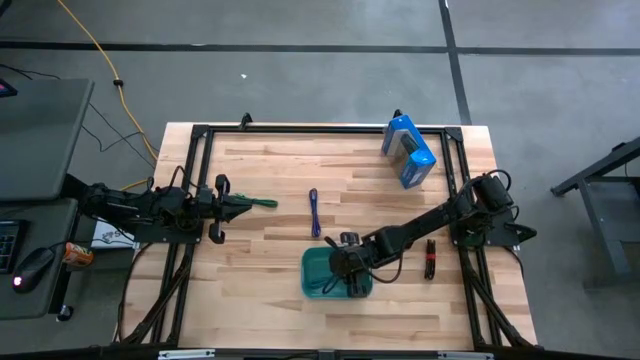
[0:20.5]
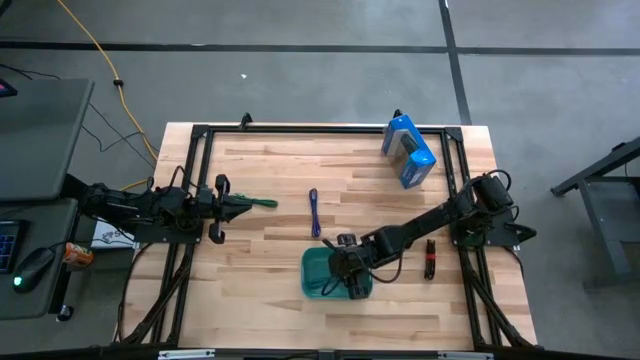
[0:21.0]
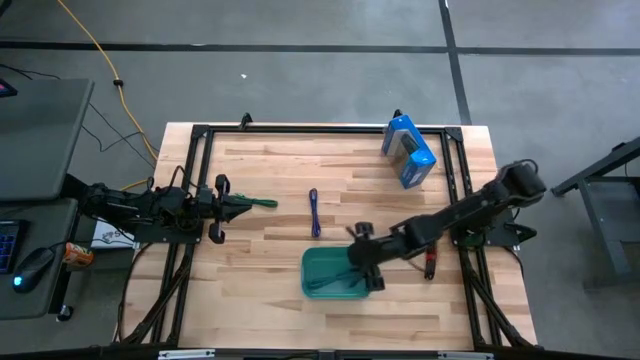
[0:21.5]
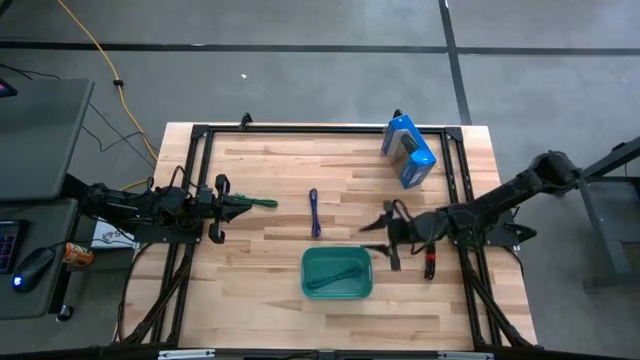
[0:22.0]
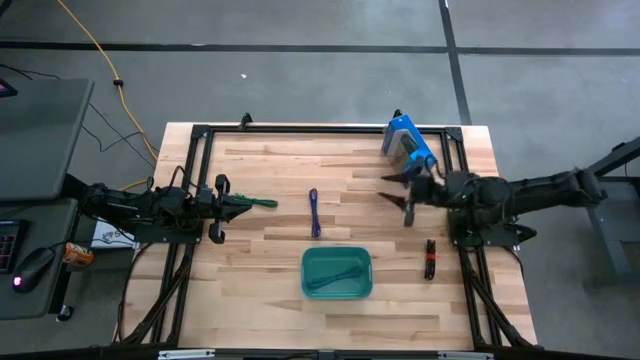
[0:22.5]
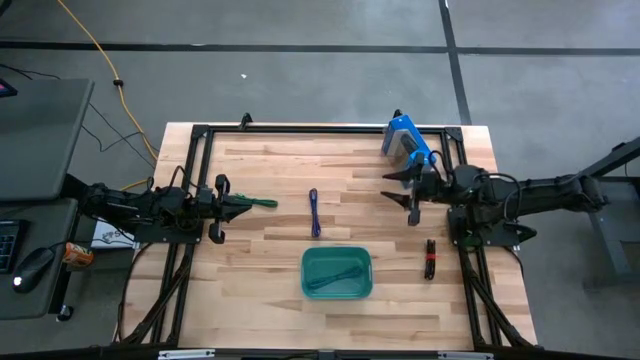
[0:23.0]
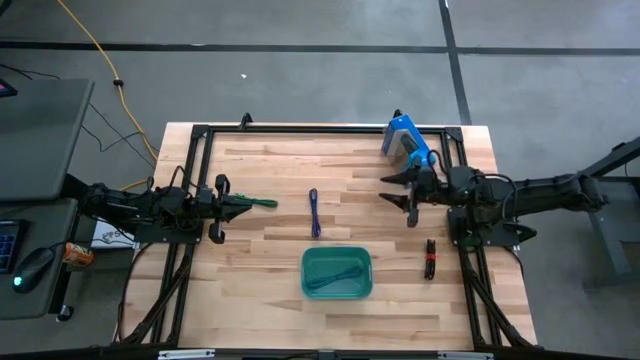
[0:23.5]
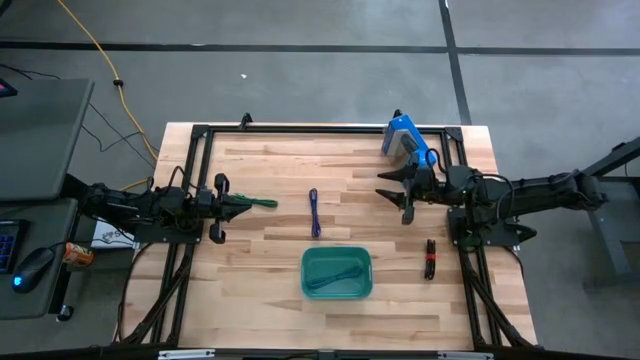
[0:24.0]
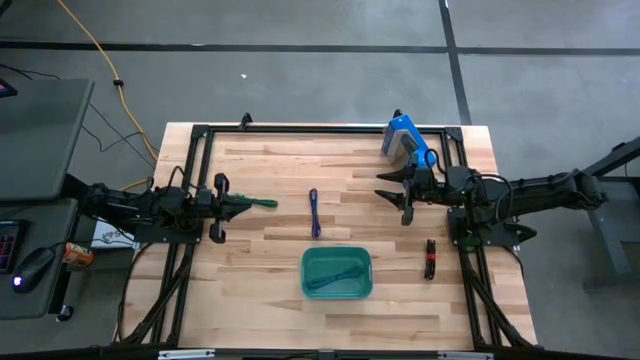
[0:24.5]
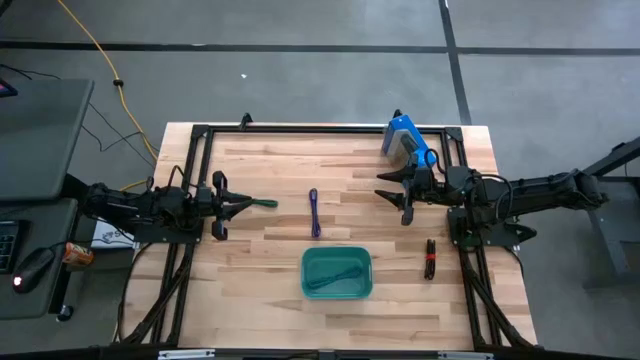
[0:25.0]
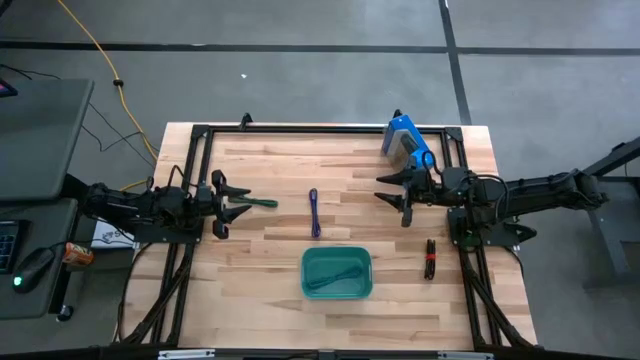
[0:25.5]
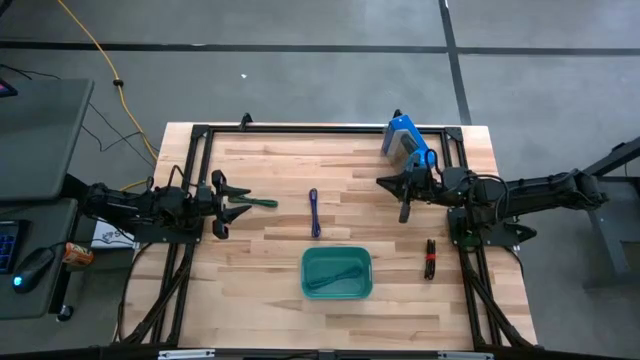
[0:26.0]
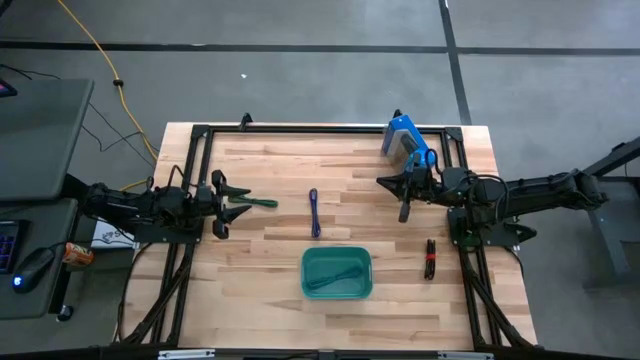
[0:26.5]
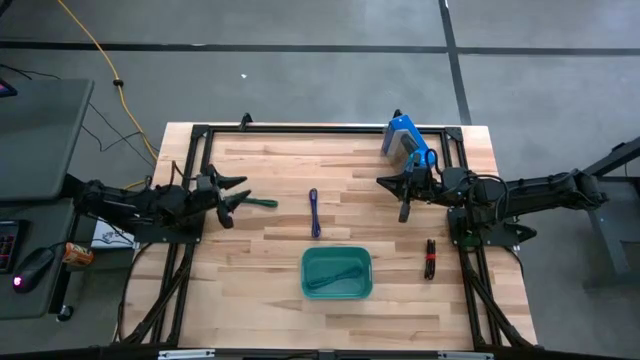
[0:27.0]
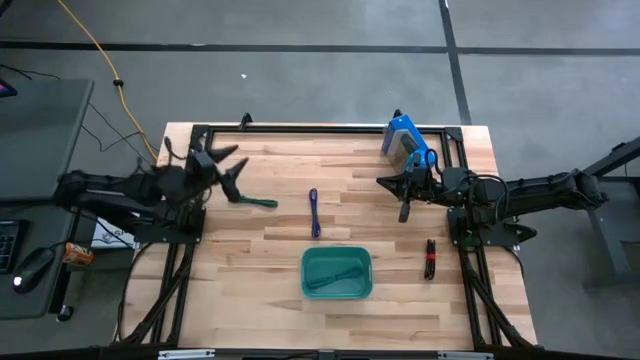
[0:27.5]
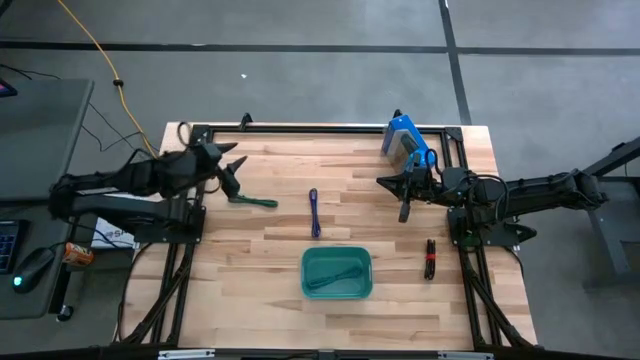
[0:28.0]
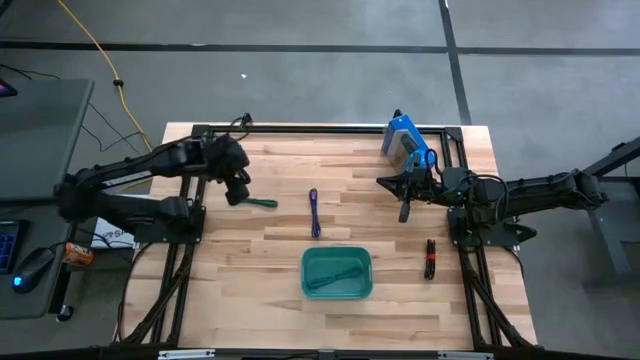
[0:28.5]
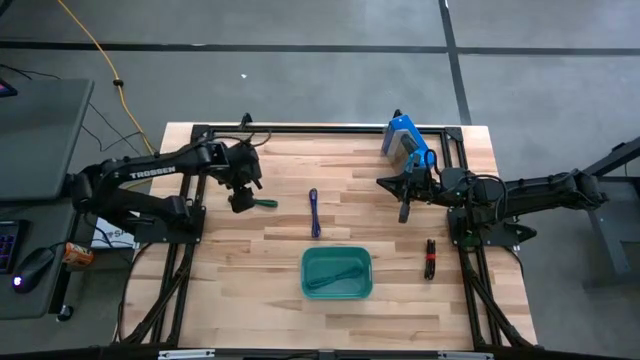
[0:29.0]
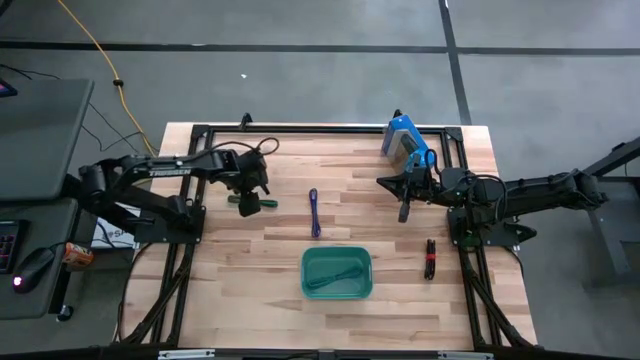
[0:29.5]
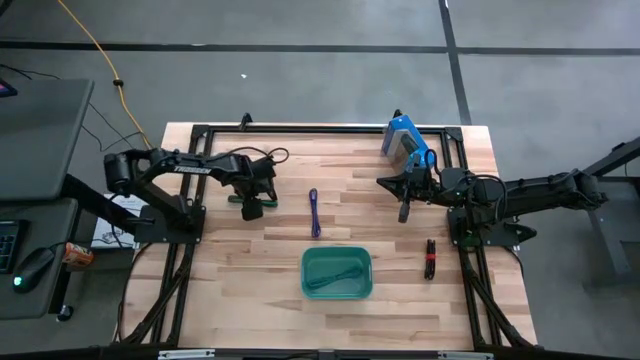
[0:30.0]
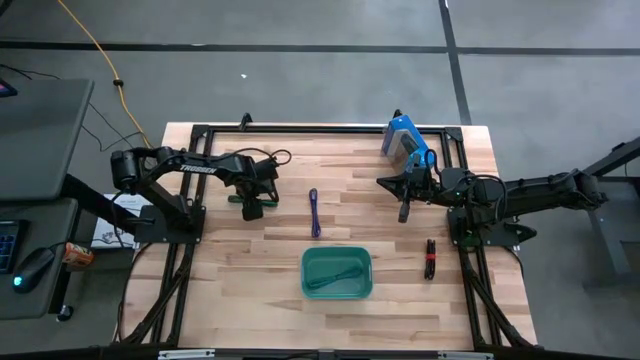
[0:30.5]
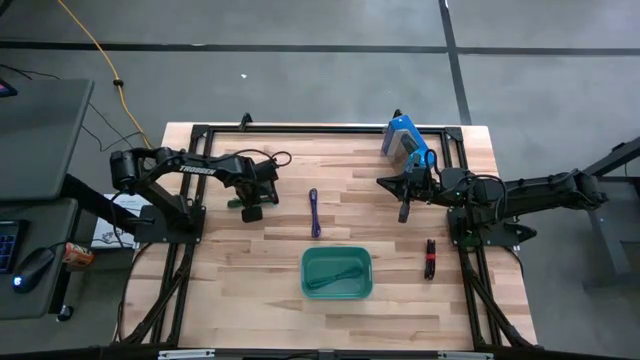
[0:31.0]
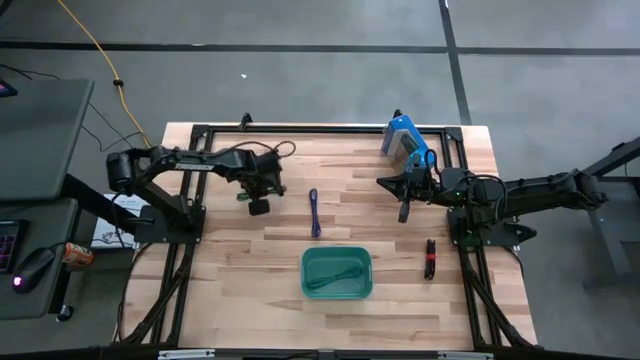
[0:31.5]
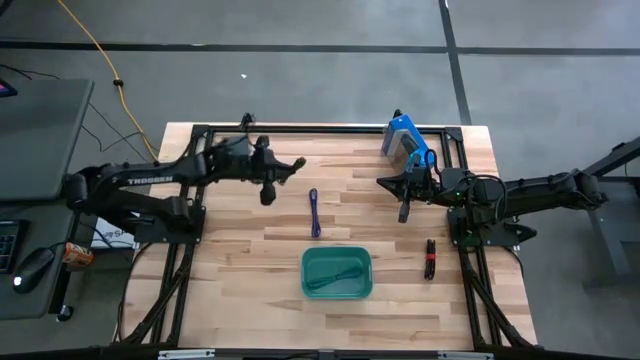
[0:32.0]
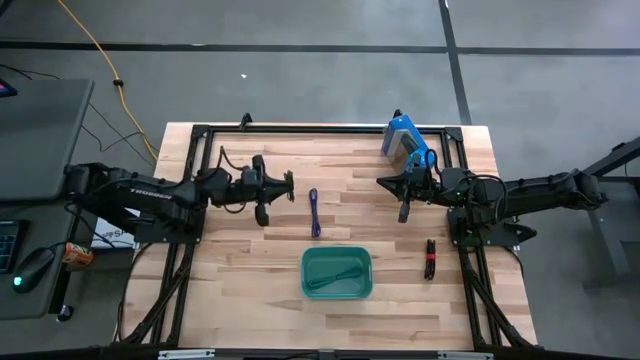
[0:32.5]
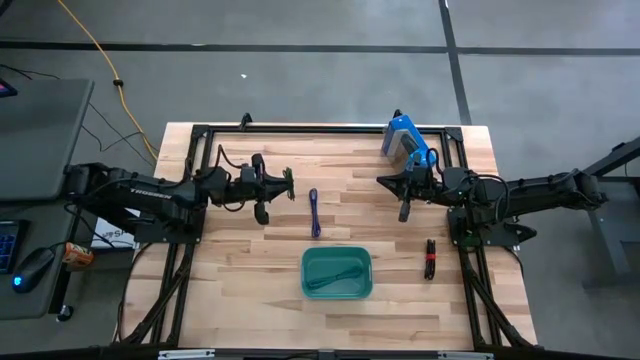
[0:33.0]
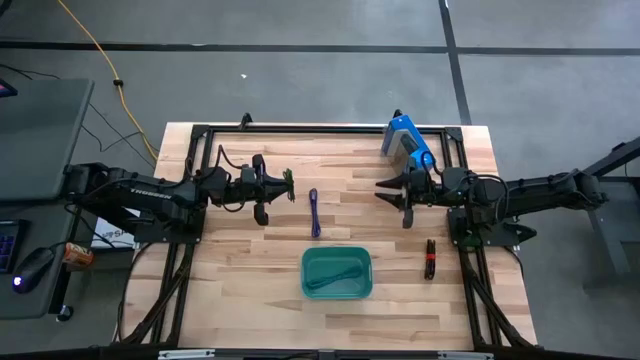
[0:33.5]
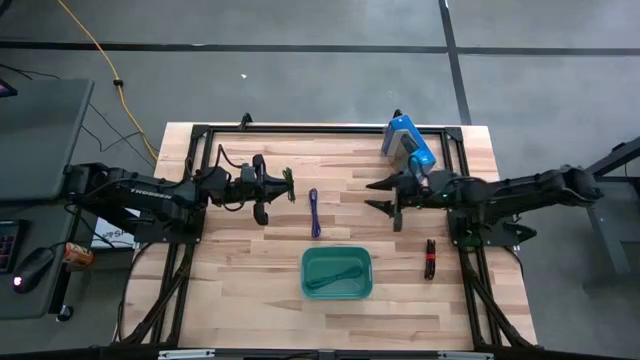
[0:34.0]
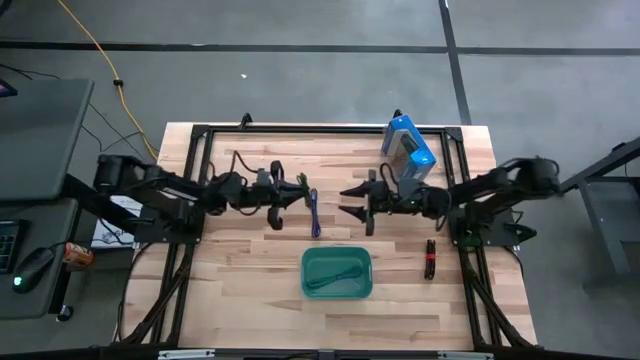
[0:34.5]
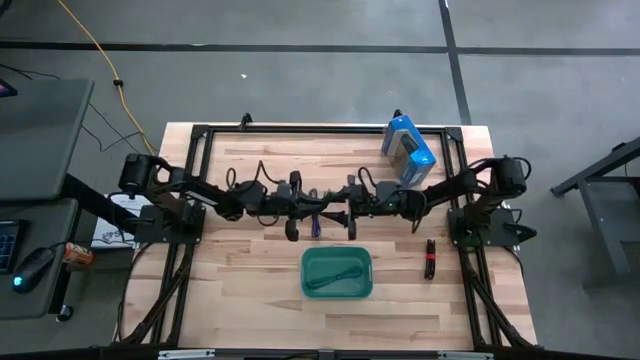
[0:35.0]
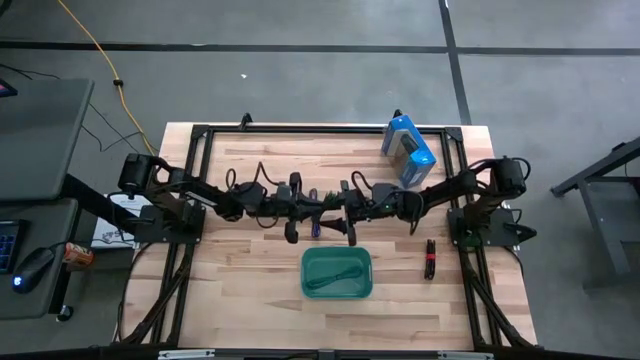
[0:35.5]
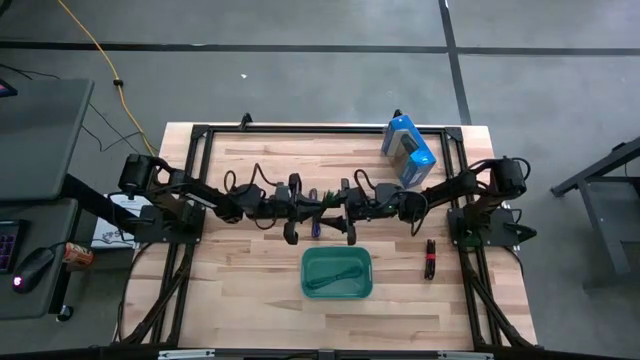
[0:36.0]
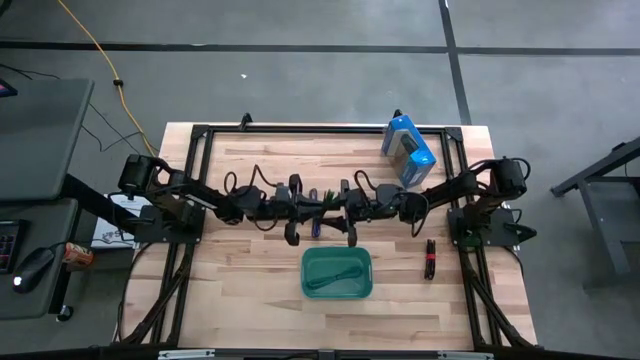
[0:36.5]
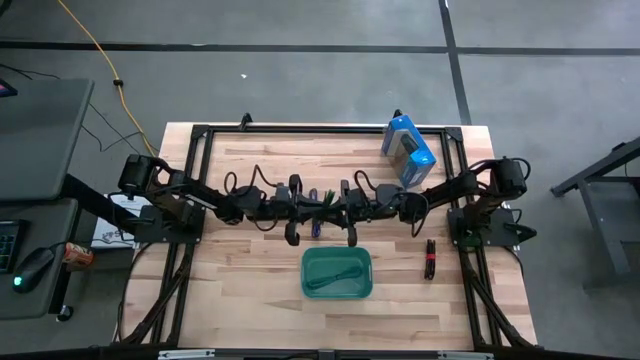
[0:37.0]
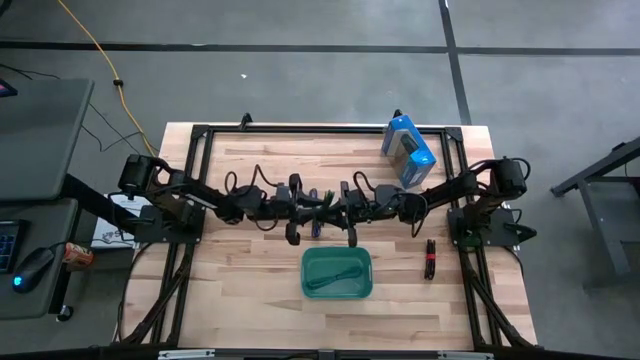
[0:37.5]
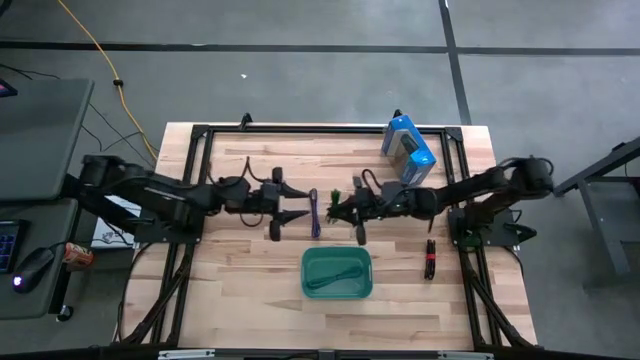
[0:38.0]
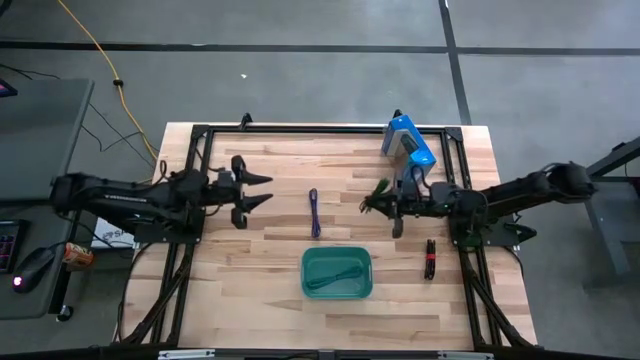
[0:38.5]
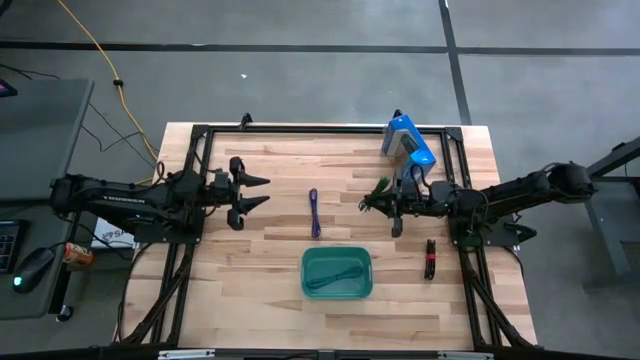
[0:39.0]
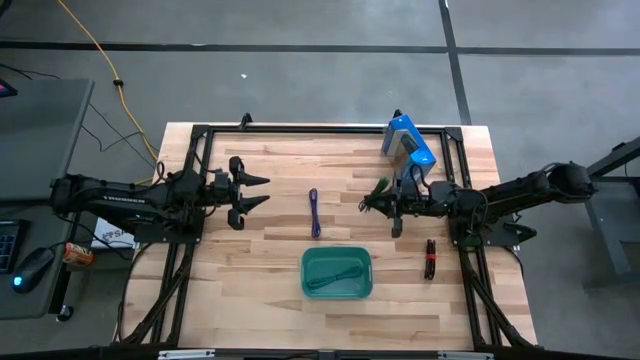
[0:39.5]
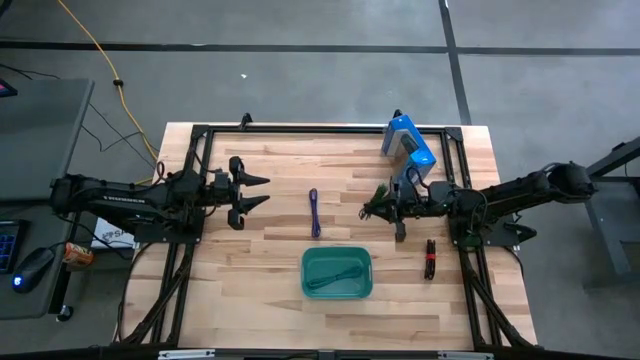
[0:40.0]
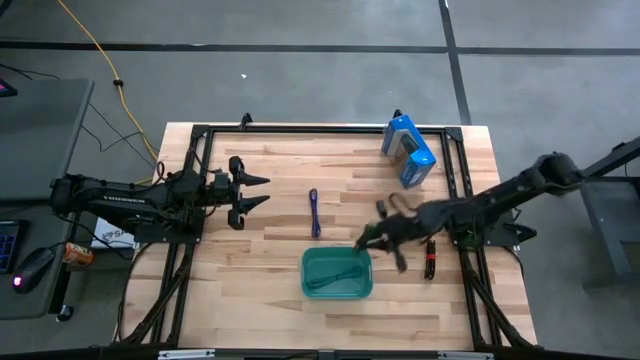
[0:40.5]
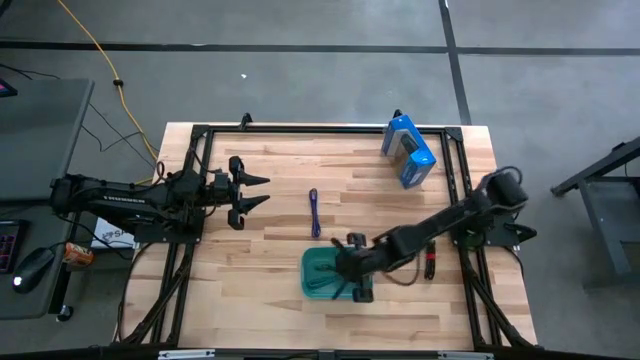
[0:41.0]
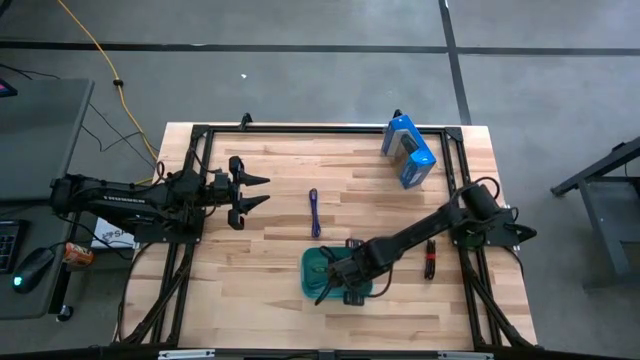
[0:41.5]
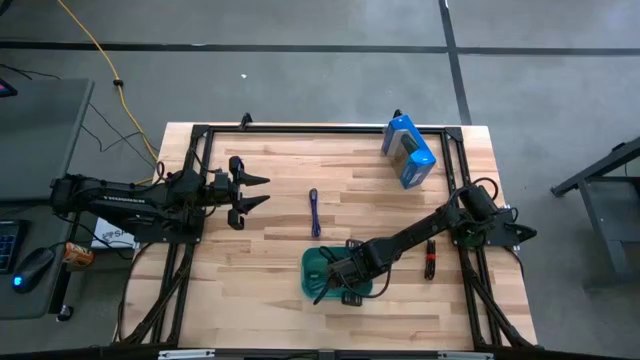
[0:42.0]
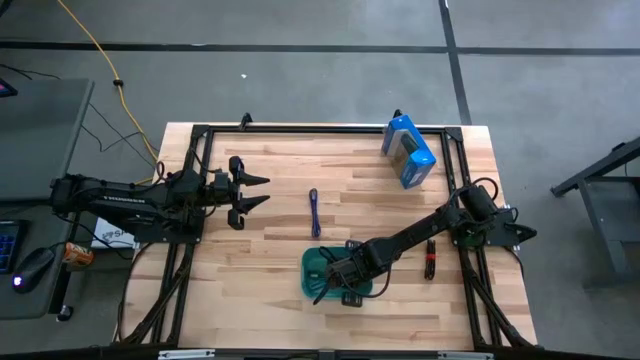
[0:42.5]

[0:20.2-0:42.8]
Task: Pick and place USB-C Cables
Put the black green charger cable into the green bin
